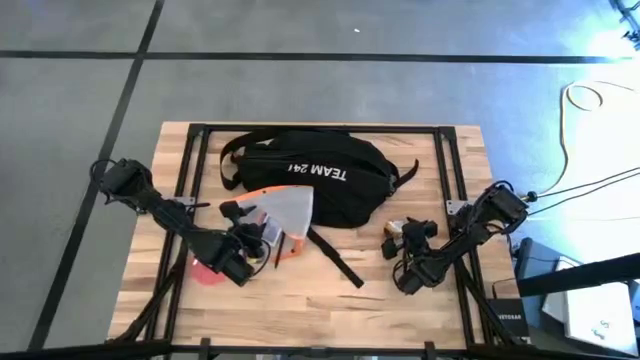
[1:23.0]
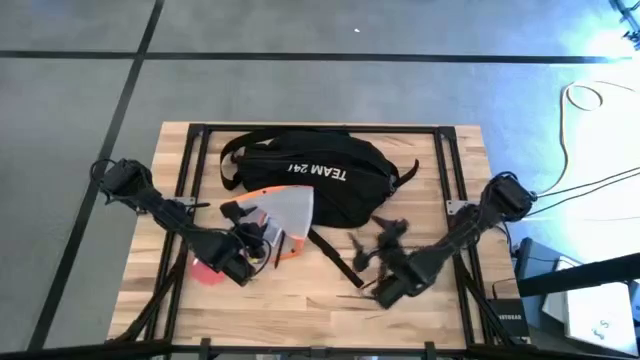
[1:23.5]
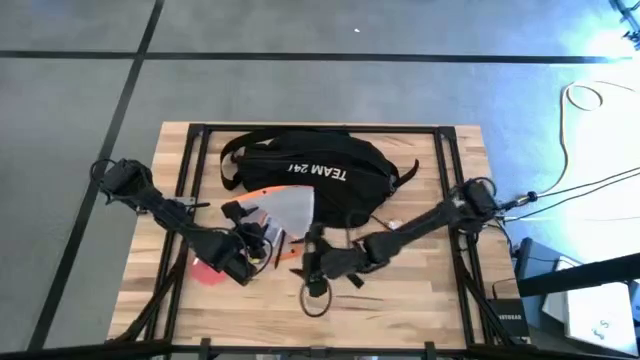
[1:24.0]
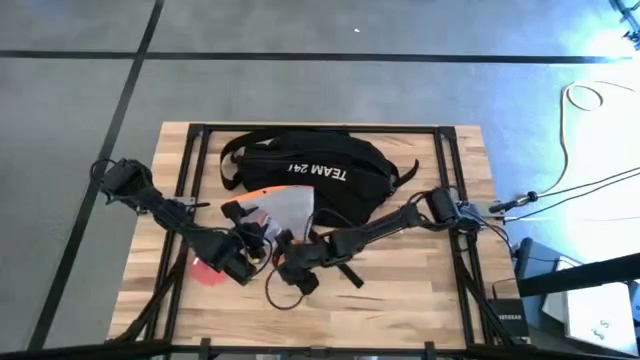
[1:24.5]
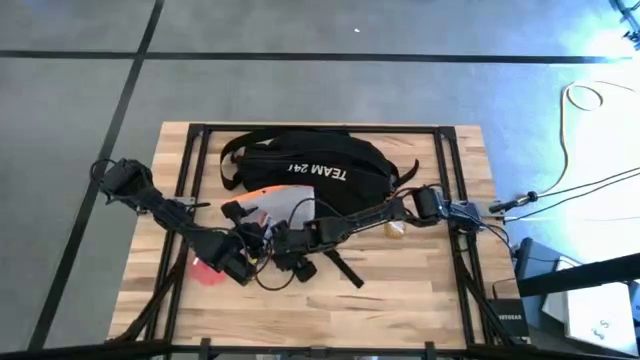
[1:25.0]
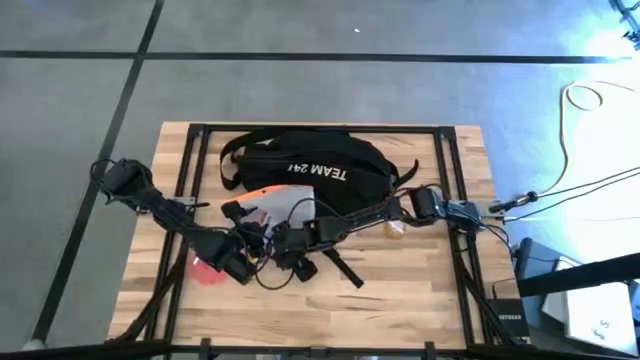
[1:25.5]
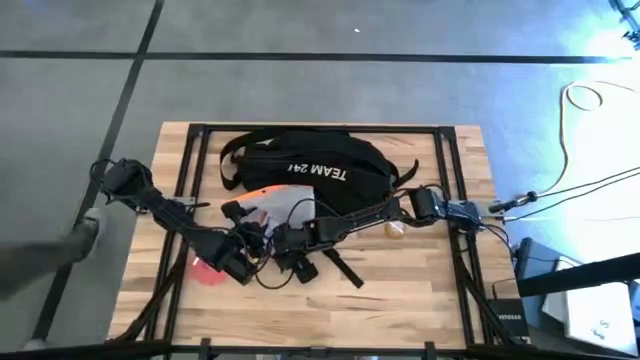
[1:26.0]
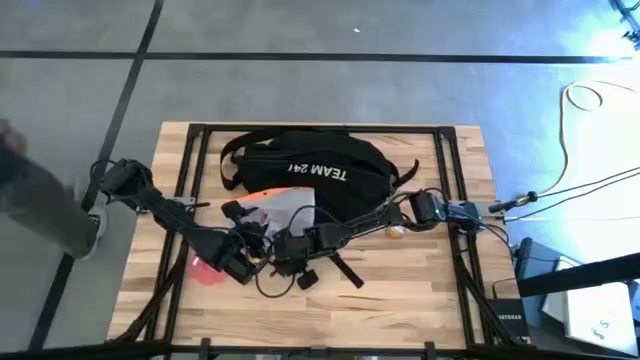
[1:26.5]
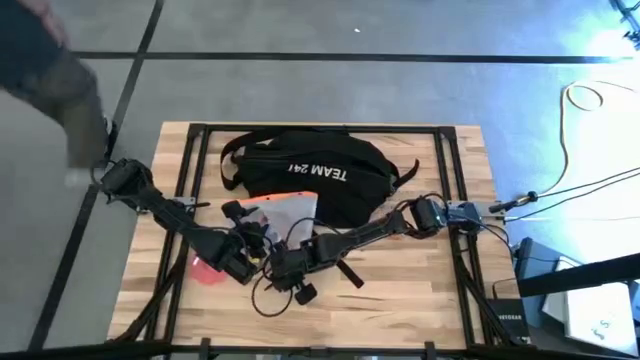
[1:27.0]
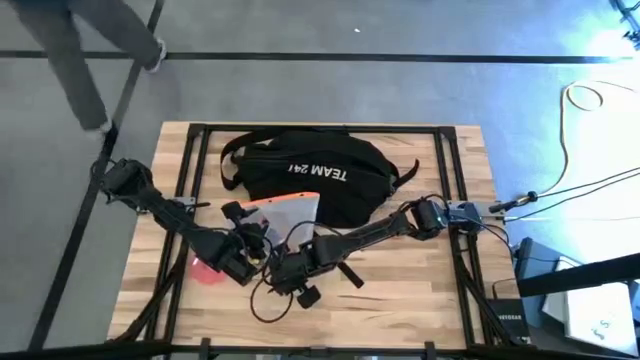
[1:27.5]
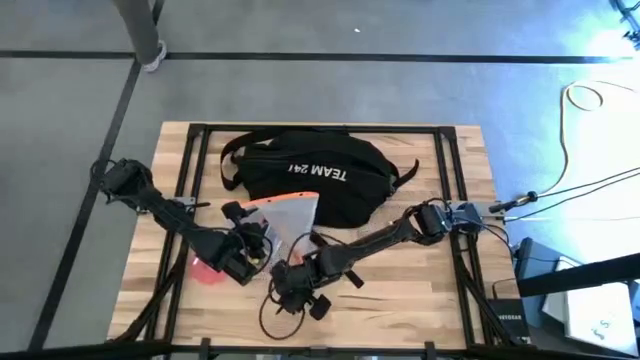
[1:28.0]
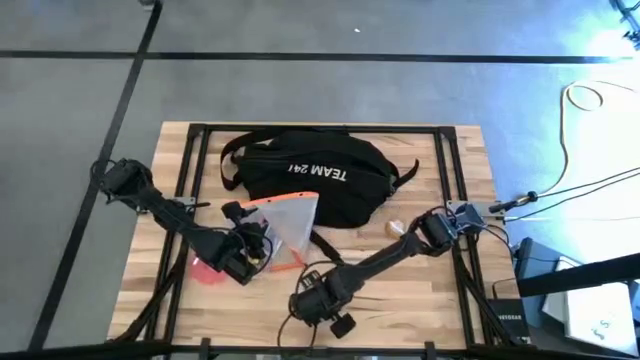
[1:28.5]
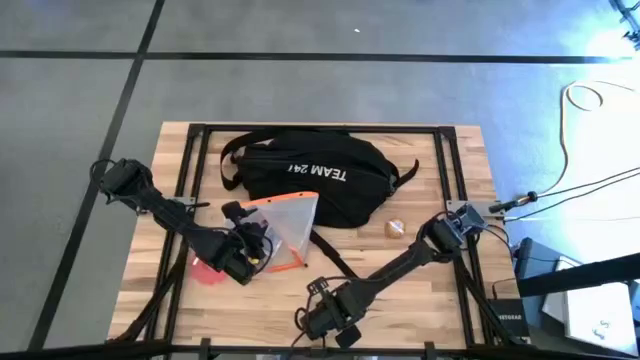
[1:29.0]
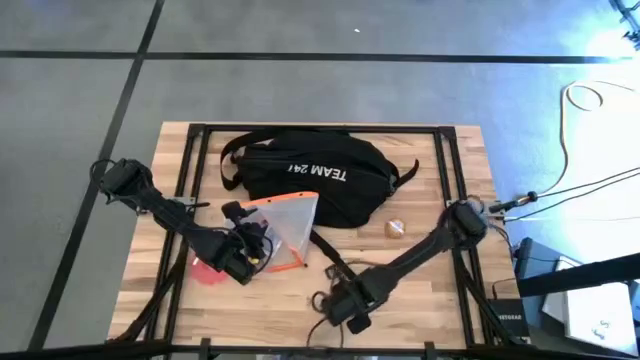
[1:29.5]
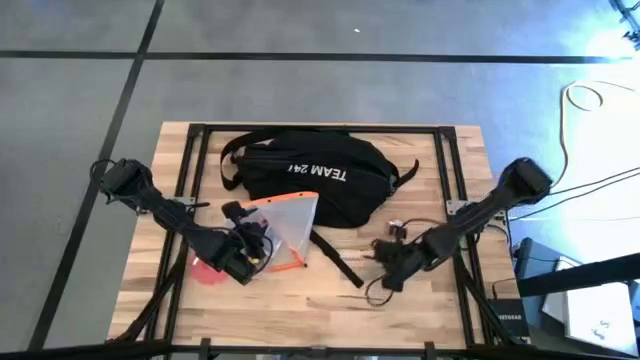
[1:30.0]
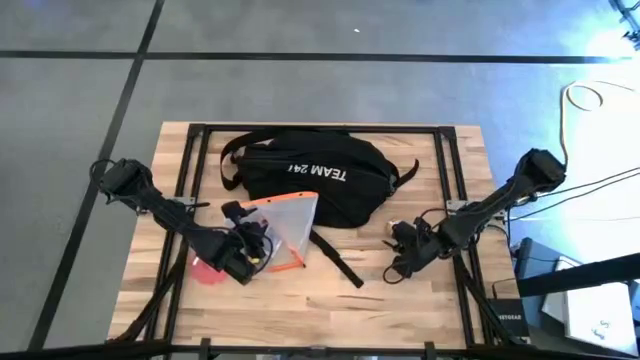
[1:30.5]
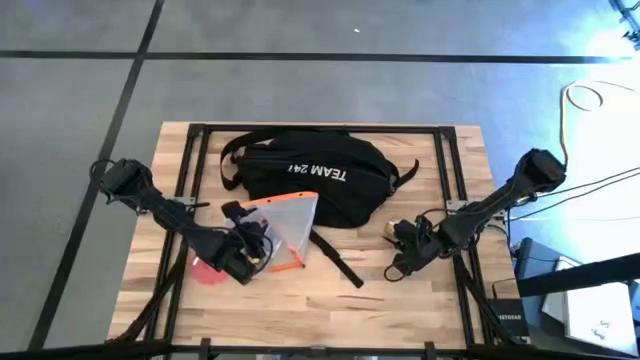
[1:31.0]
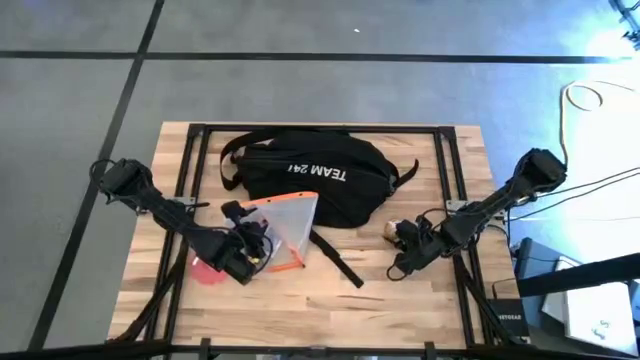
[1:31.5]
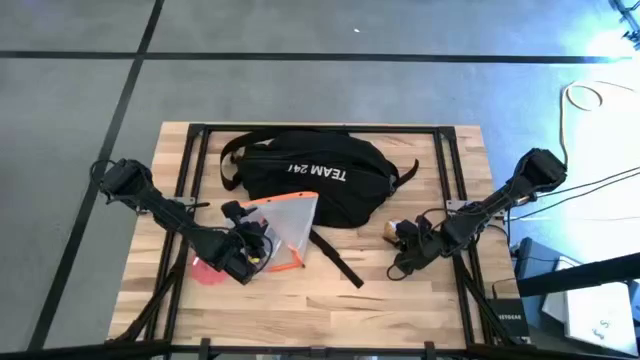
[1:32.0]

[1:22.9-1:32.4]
Task: Unpack backpack
Remove the black pen from the white zip bag

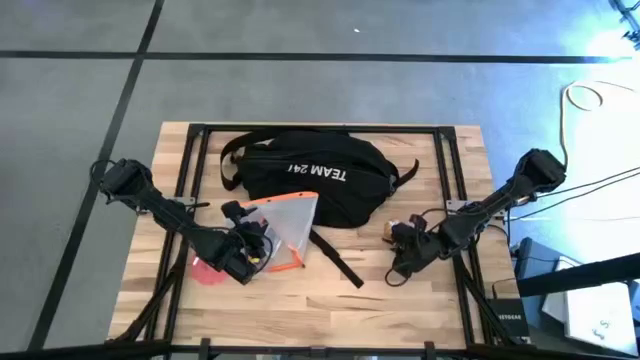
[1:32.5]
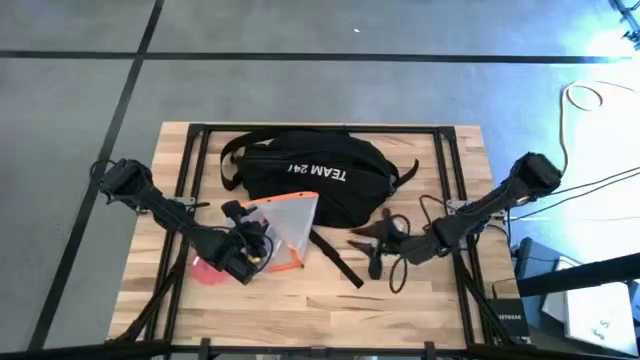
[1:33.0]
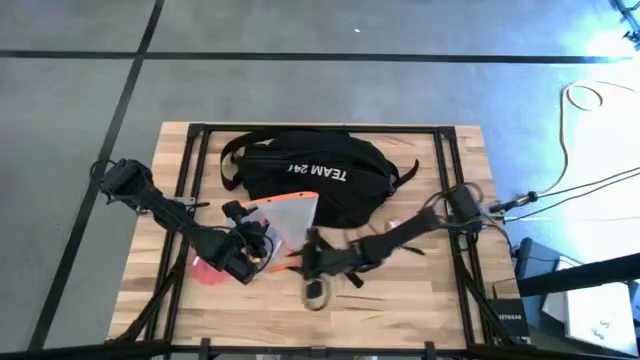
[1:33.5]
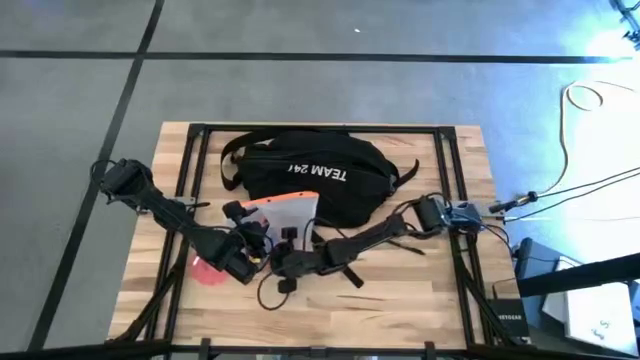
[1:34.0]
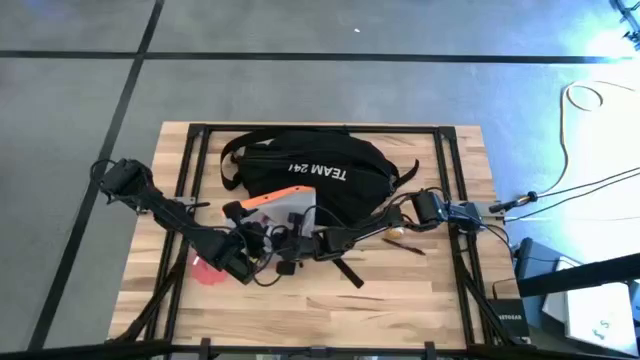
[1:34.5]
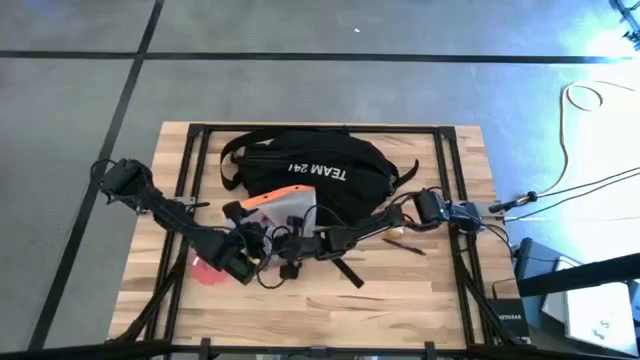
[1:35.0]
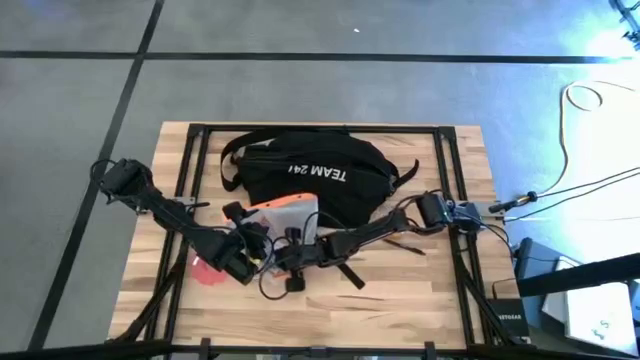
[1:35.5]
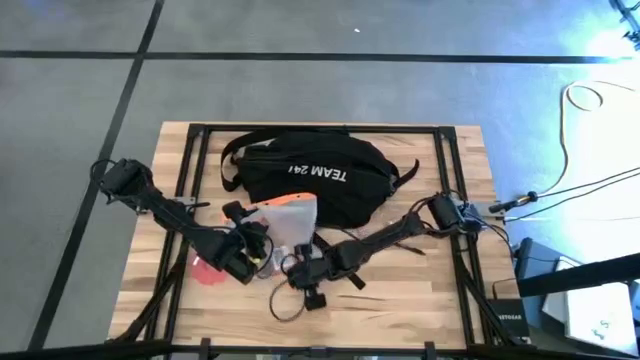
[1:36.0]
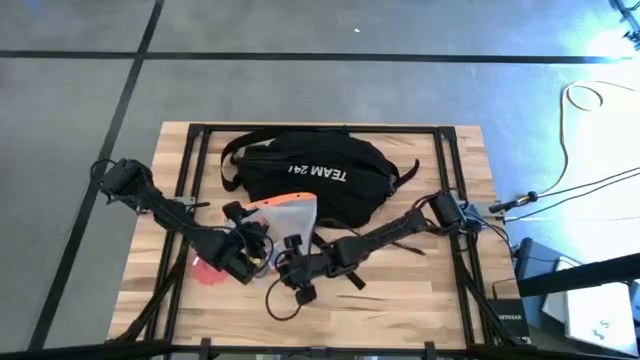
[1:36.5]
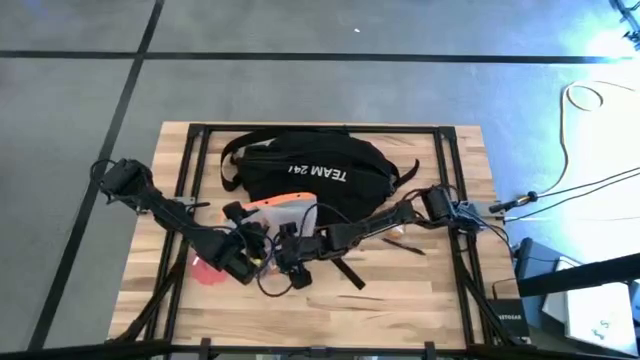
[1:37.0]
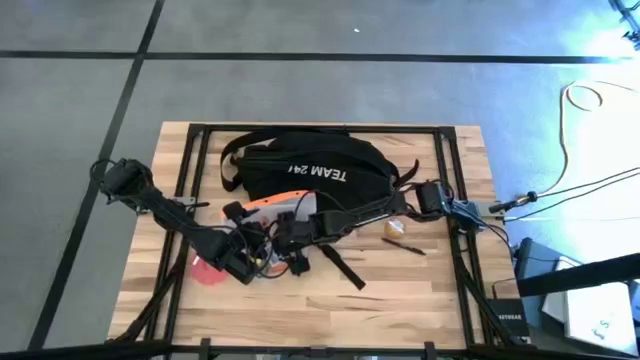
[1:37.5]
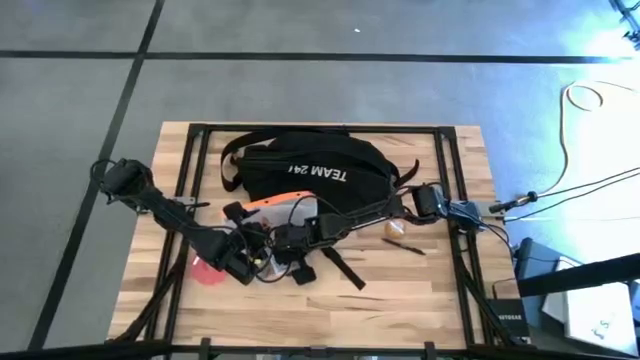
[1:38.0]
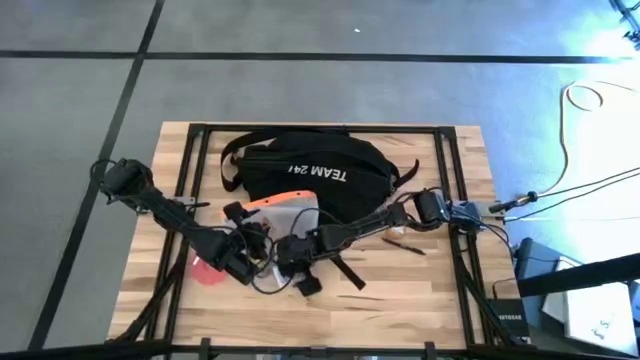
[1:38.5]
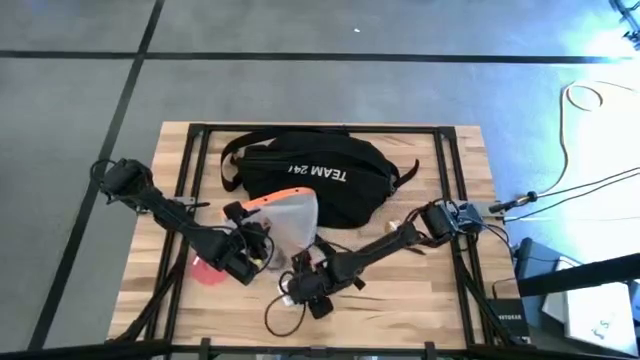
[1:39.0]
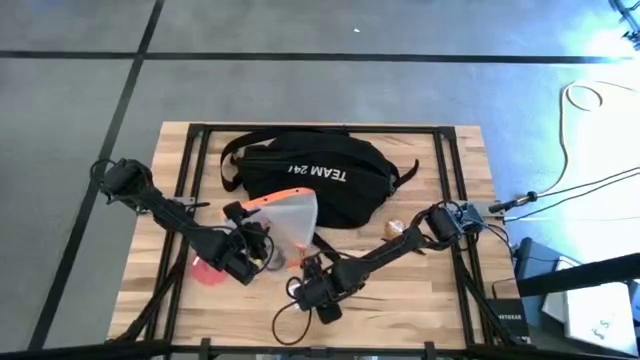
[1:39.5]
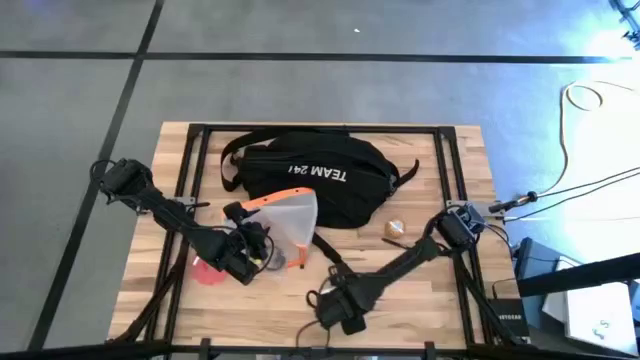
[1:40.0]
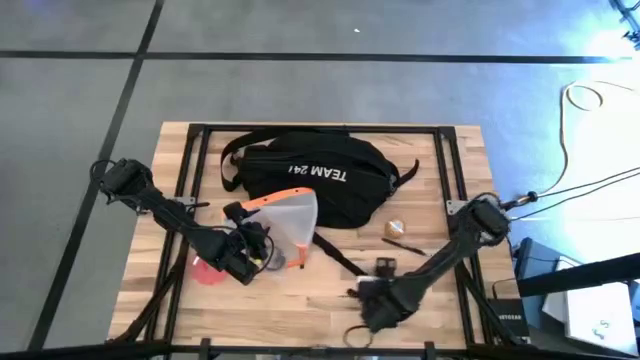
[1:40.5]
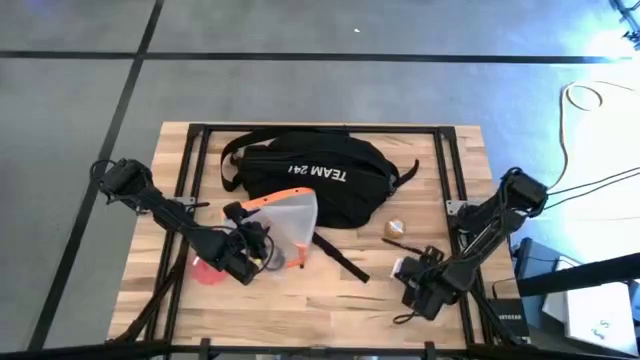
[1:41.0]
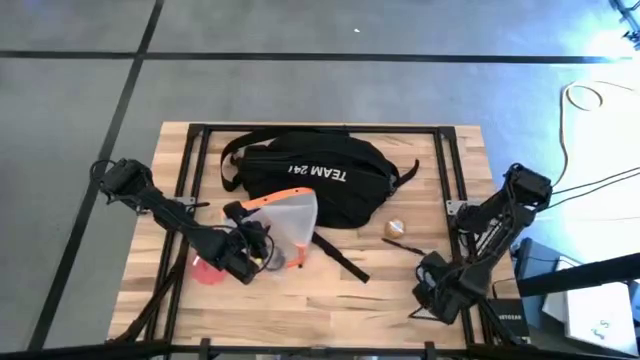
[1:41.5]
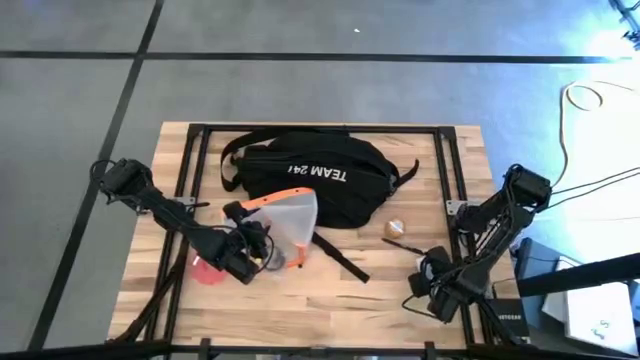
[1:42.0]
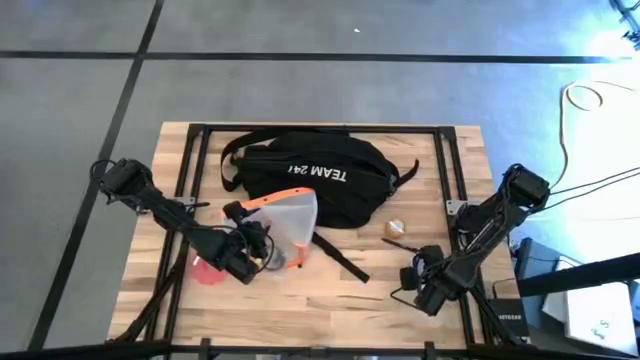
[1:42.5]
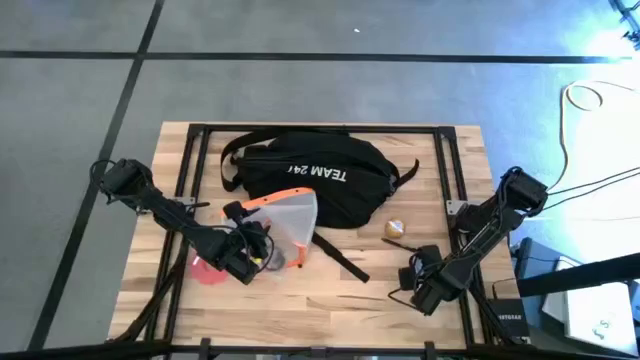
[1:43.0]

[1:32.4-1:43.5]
Remove the game card from the white zip bag
